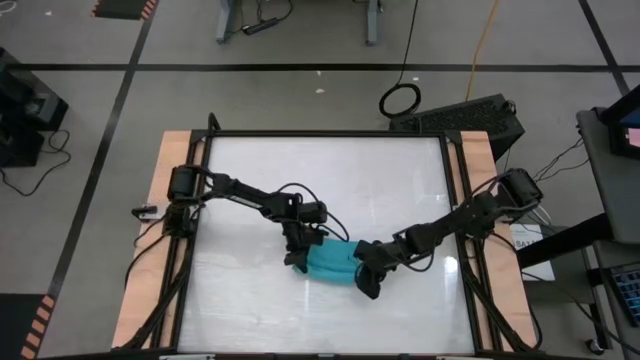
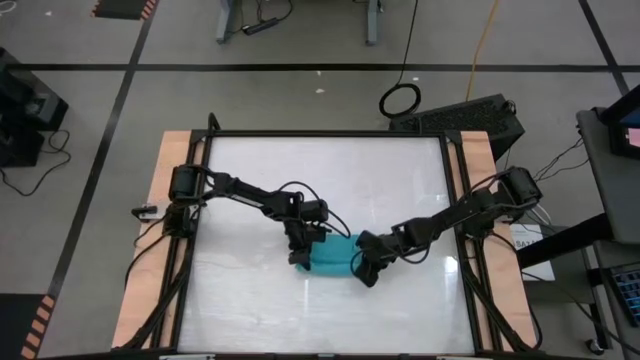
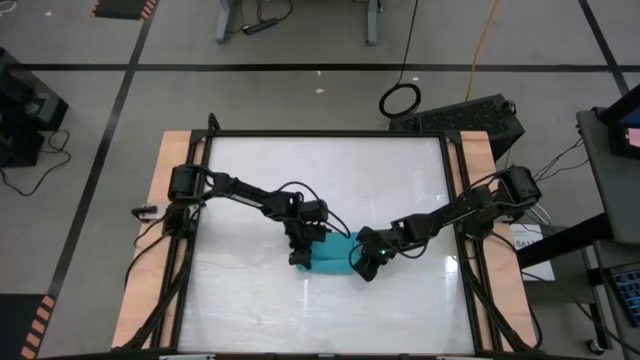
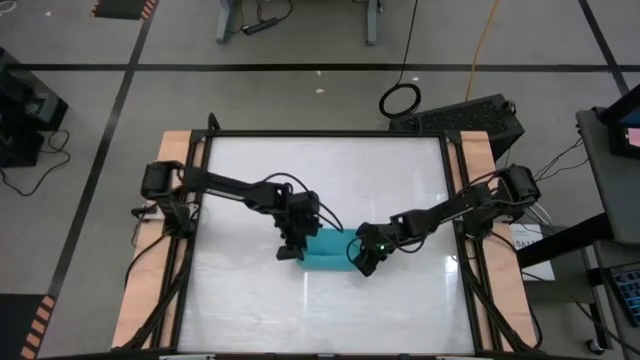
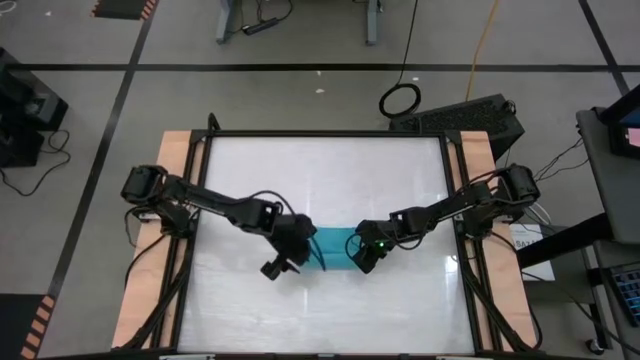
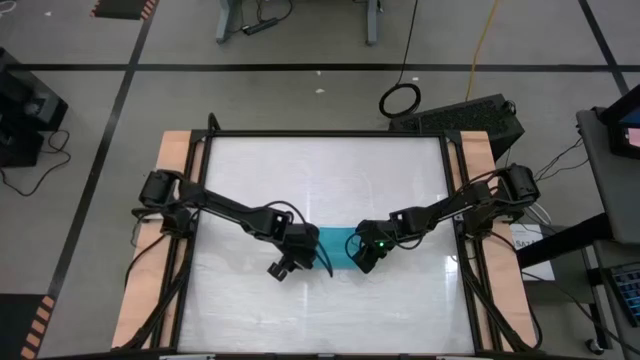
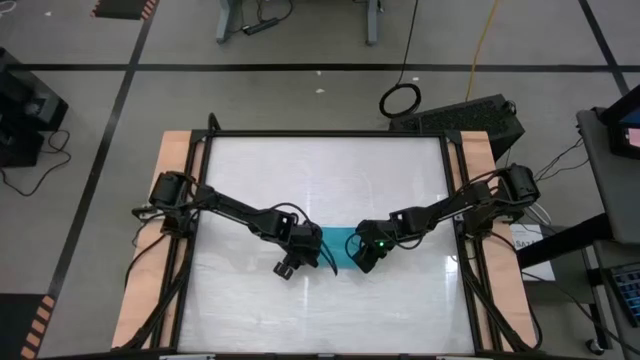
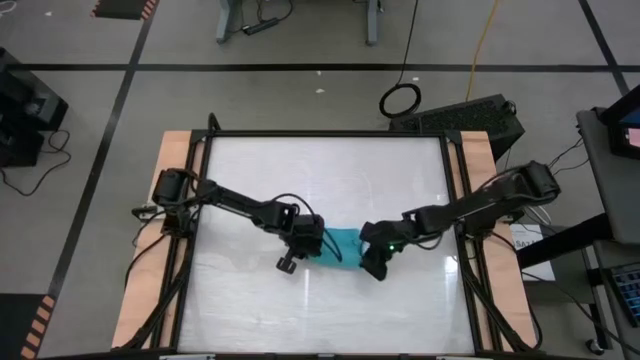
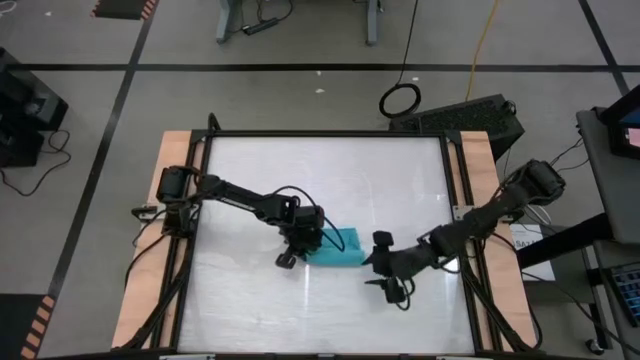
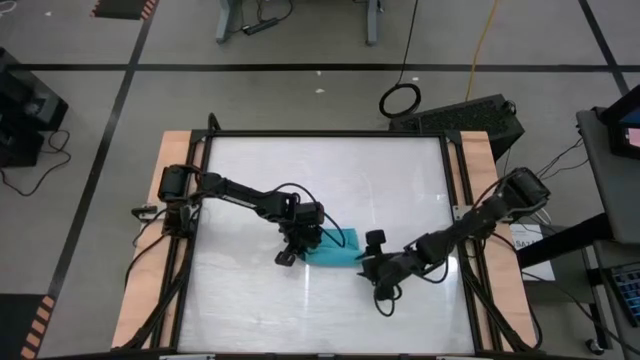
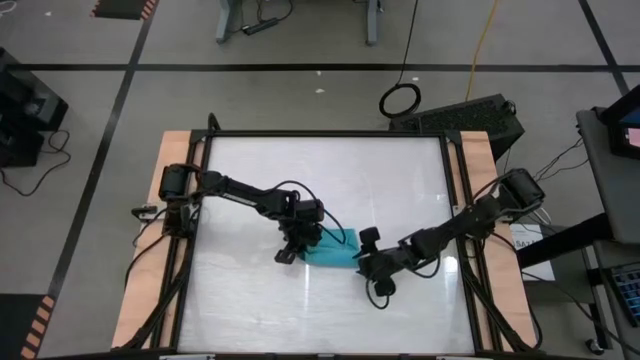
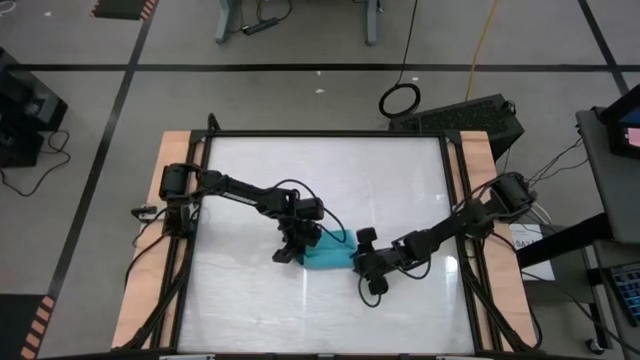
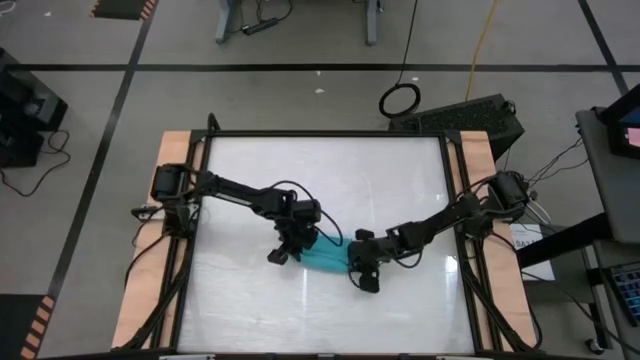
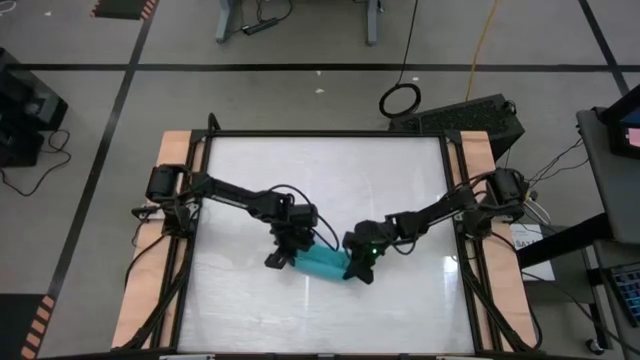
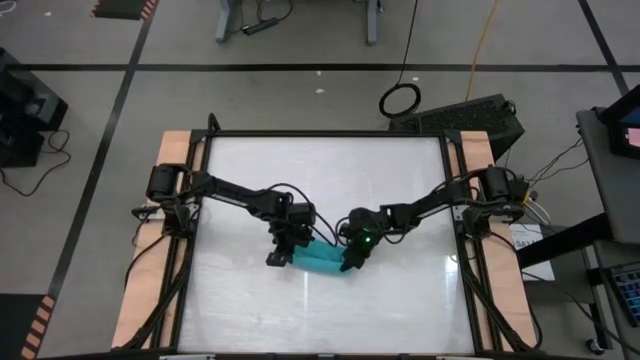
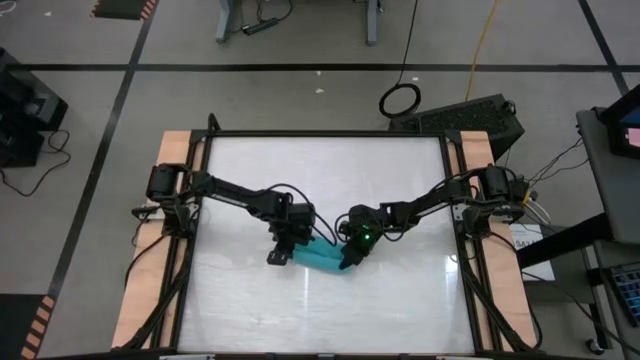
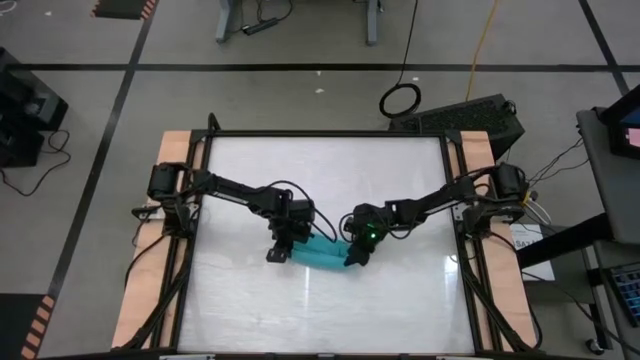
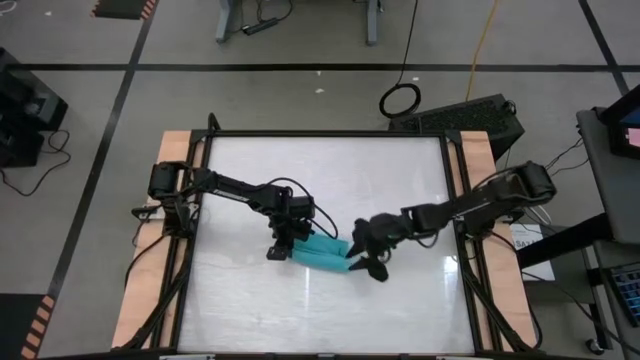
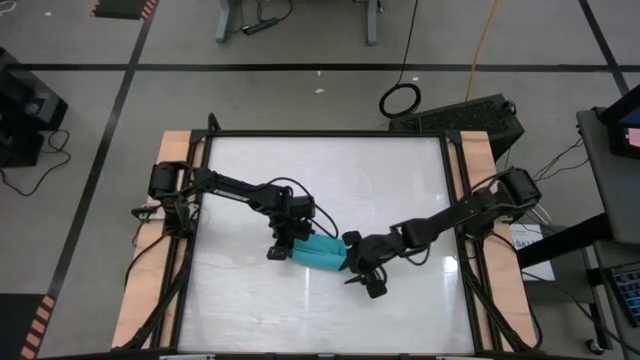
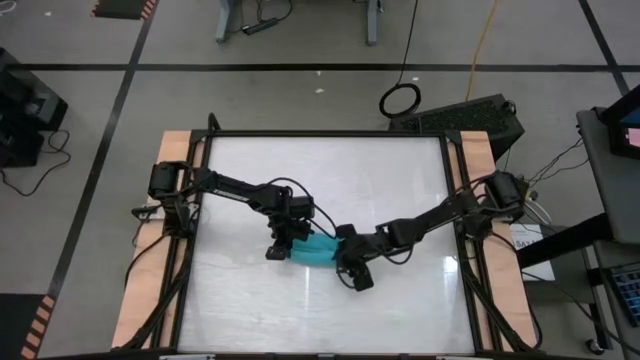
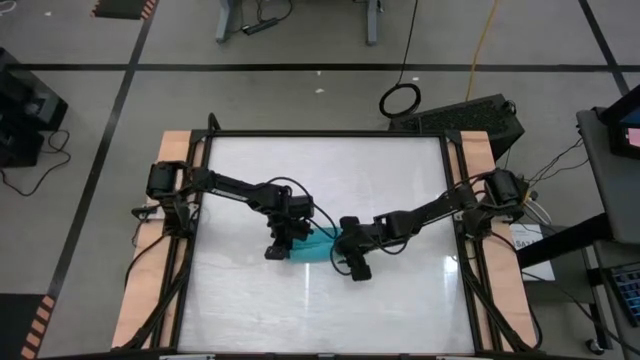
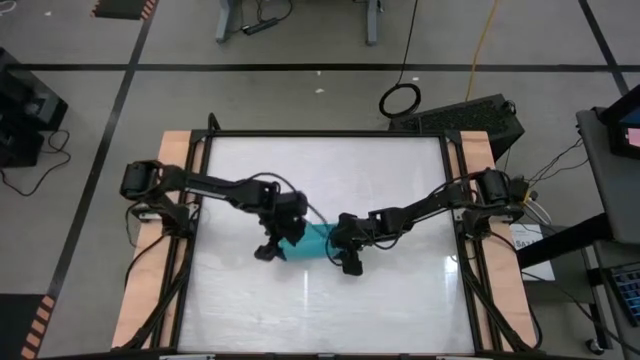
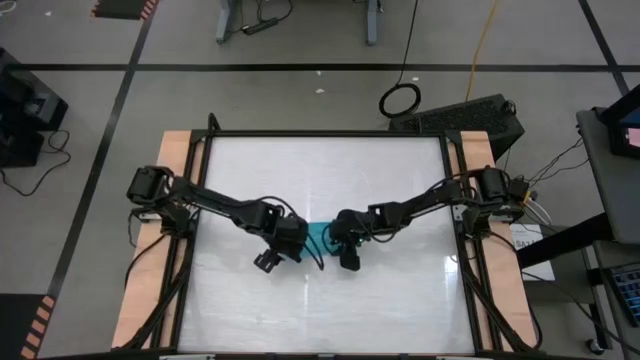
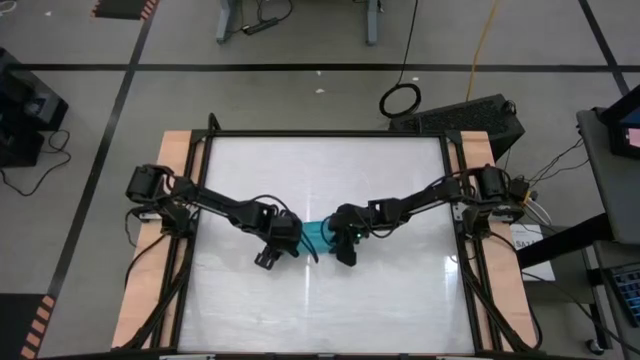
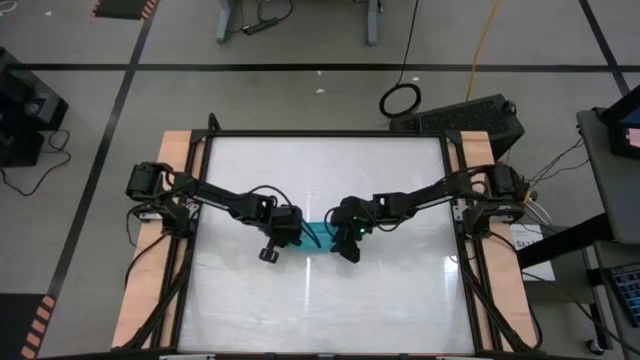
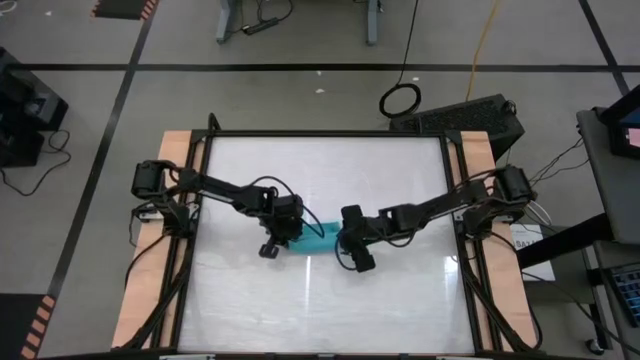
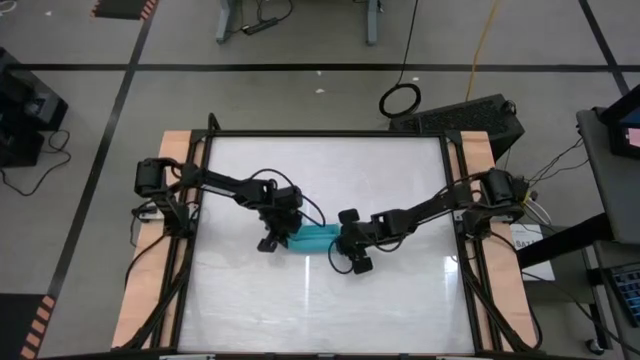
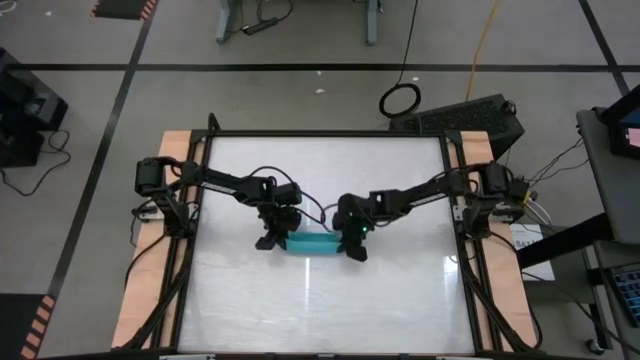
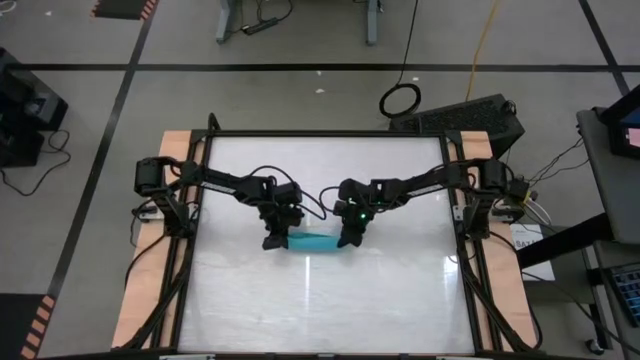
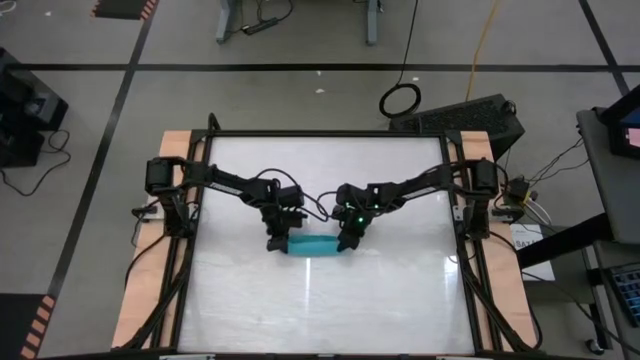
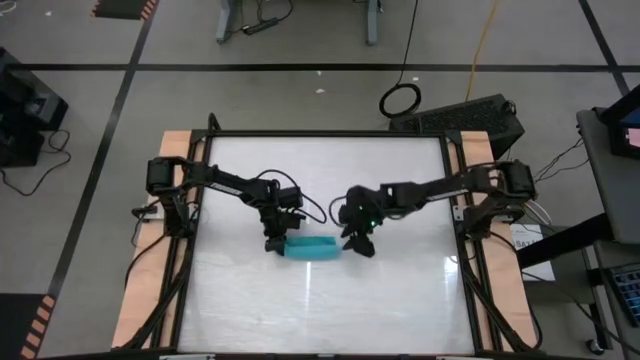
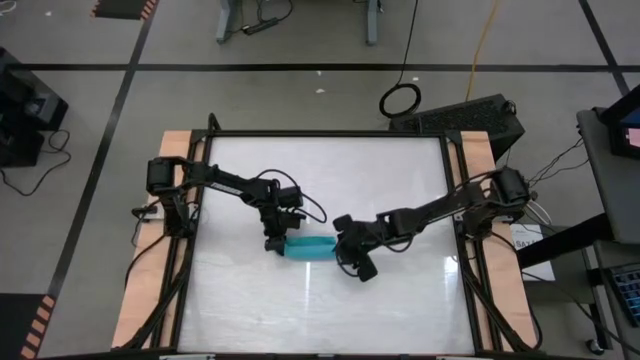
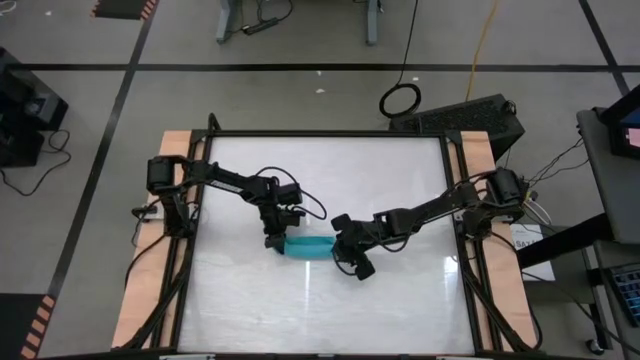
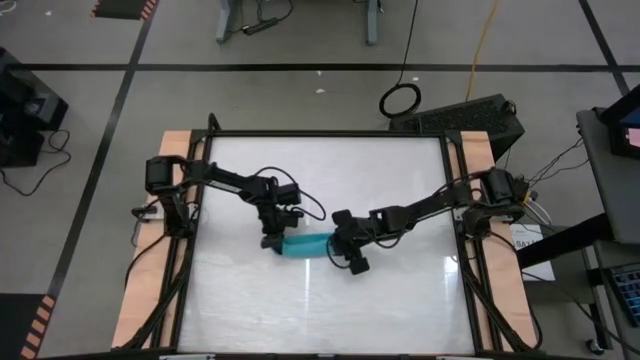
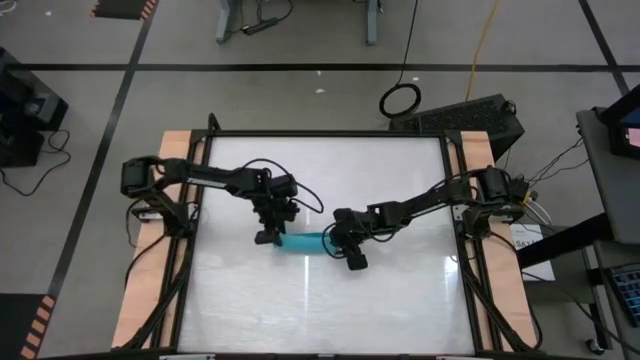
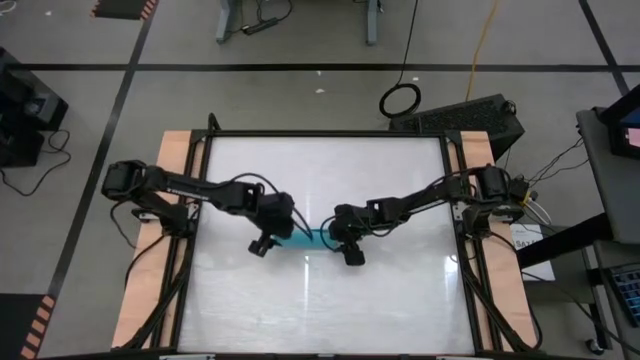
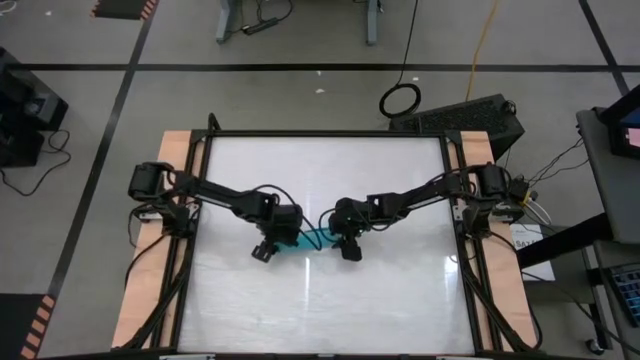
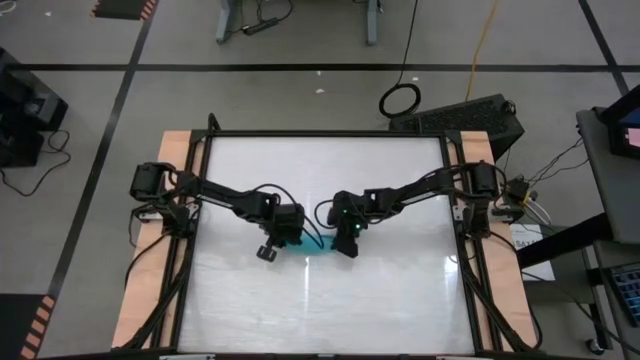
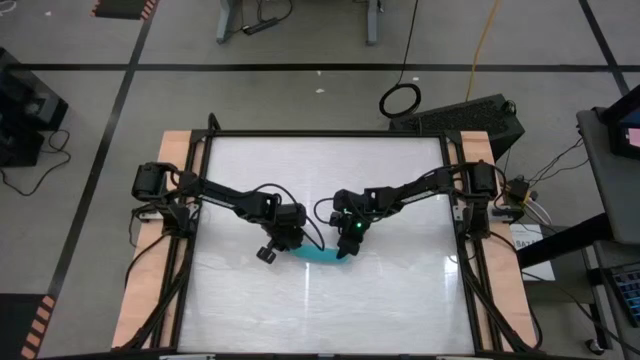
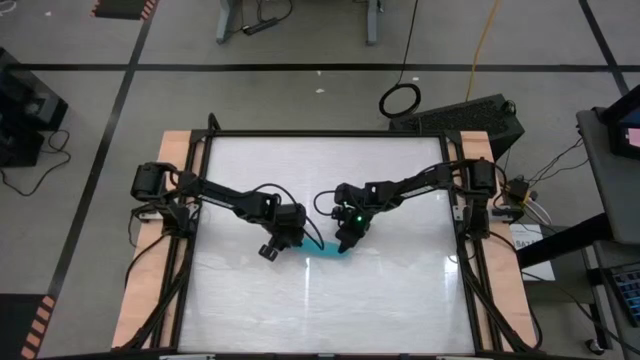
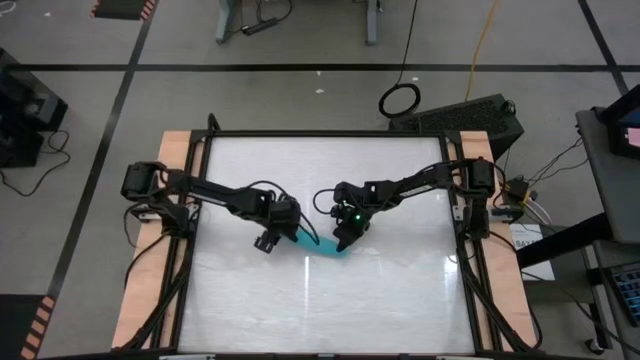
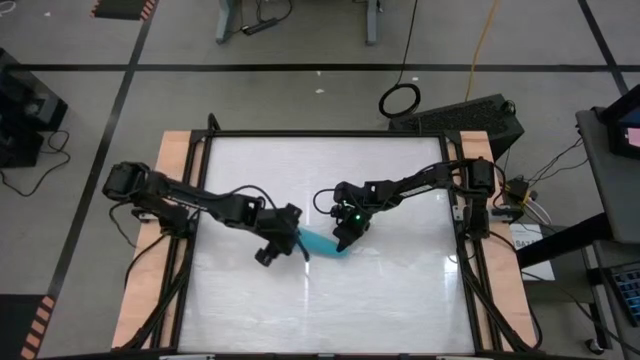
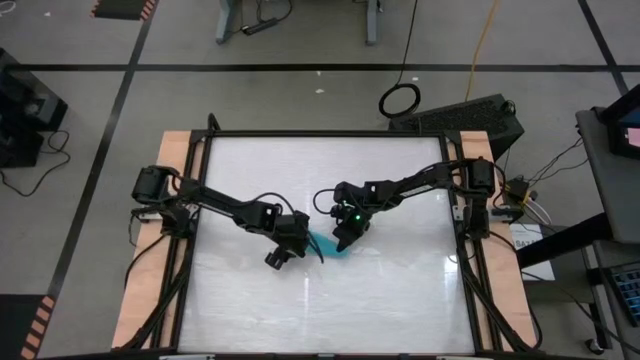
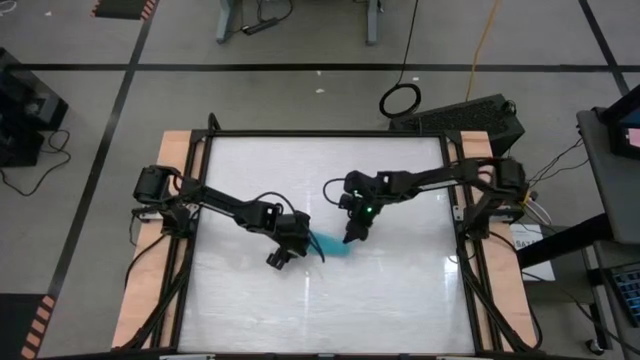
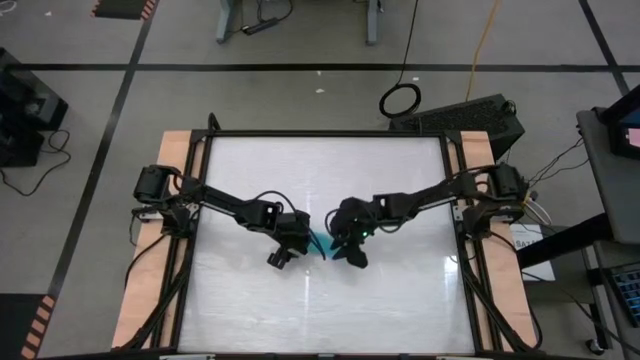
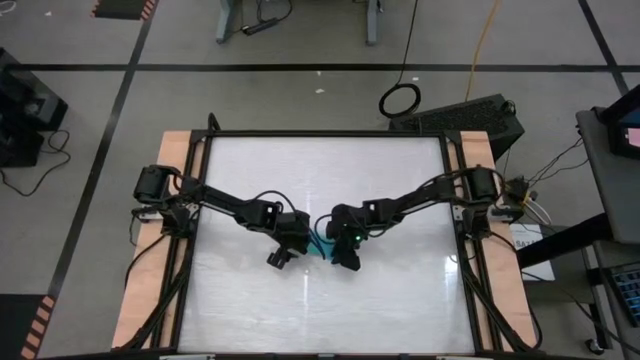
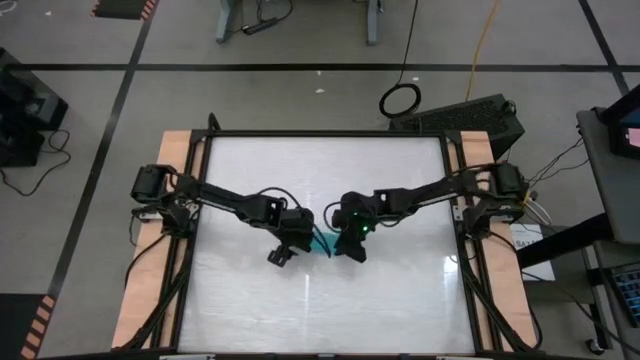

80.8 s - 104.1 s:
Task: Roll towel
Roll the blue towel
